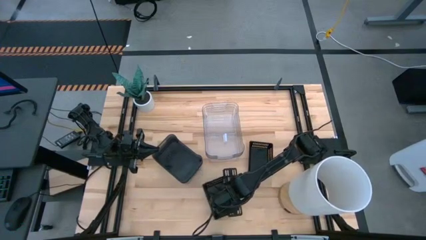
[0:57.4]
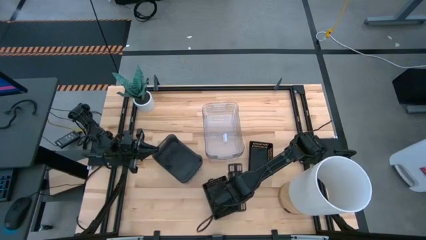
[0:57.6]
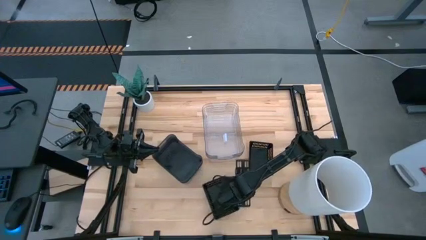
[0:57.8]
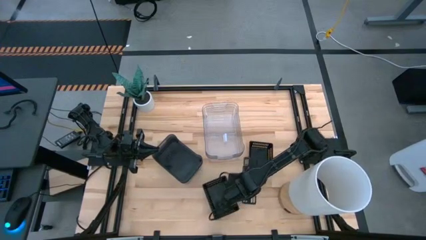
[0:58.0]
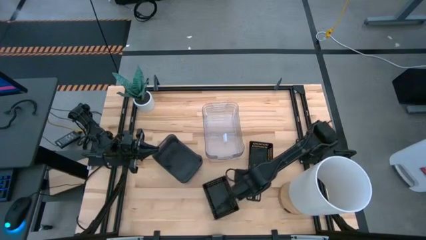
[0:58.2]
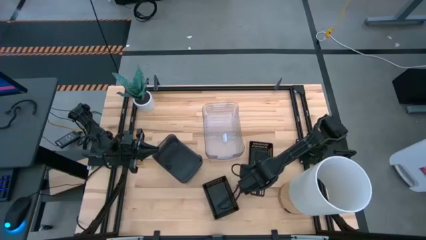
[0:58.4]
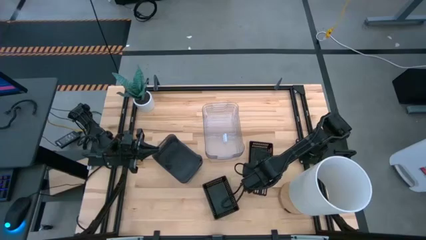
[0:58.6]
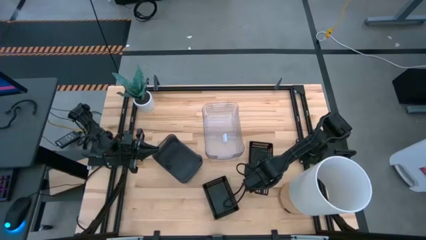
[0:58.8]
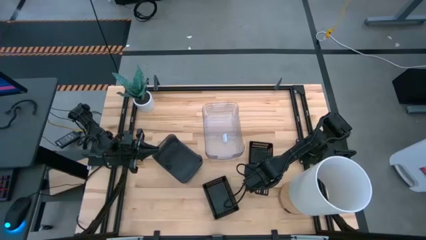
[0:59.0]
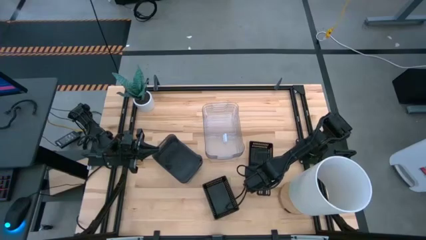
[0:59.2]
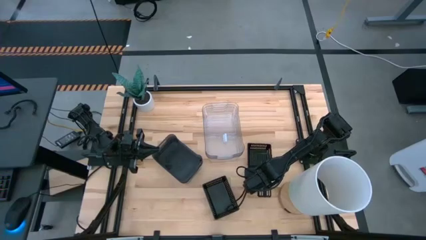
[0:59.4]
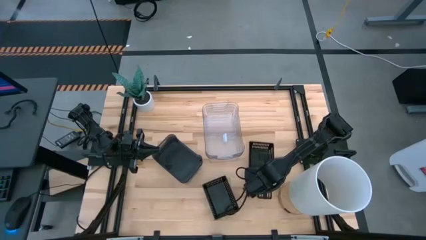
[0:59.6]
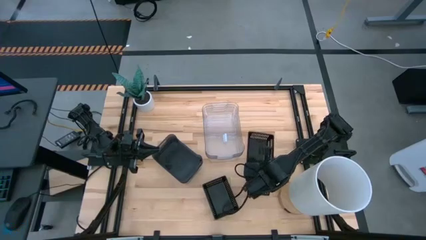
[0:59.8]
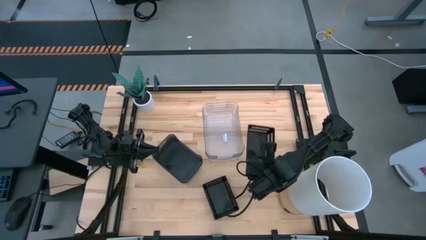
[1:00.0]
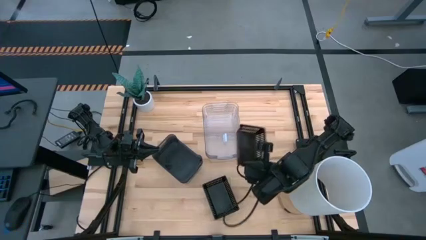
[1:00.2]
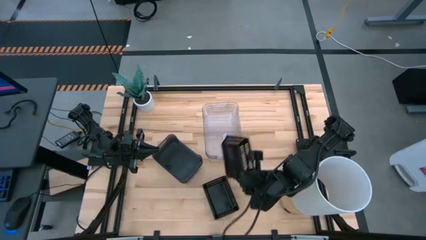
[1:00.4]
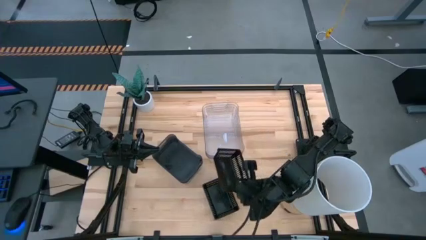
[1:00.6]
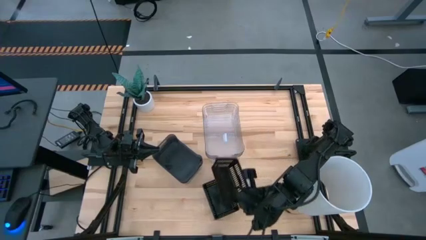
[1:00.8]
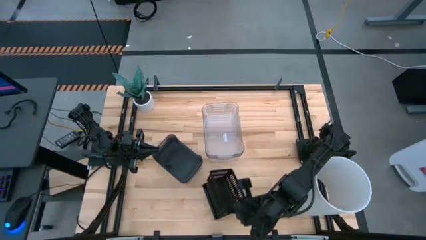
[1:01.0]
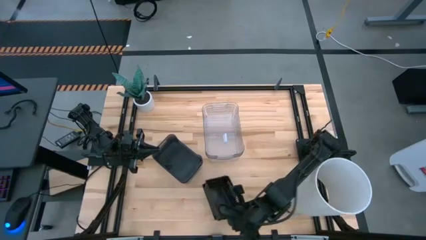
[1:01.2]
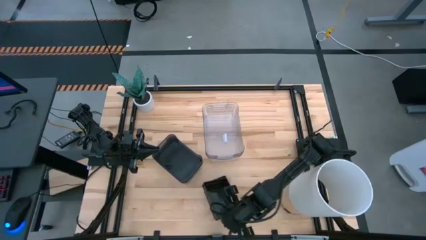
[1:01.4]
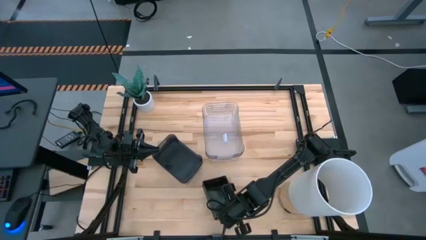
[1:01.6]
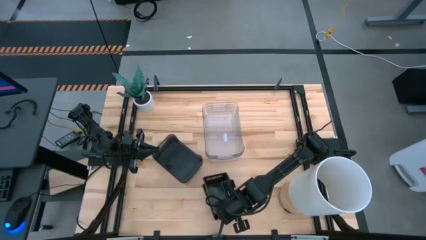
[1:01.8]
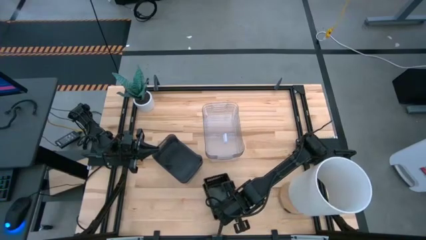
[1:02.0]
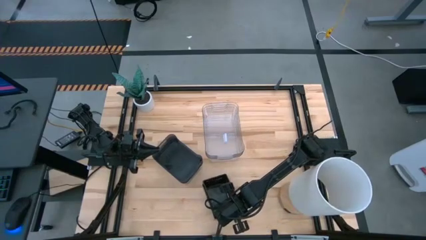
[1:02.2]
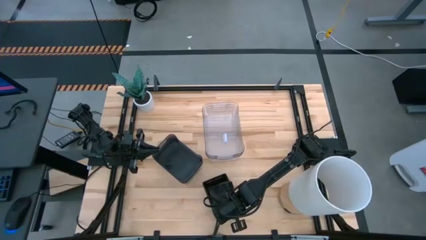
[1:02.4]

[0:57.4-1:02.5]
Stack the black bin on the left black bins

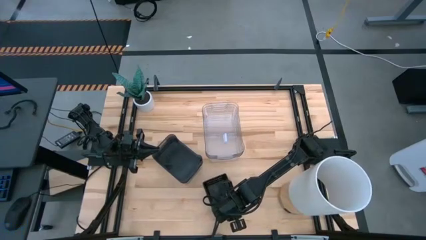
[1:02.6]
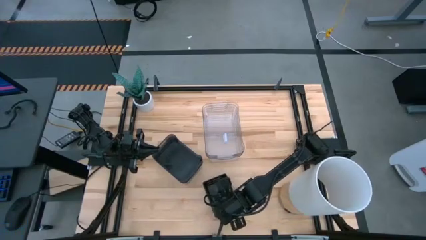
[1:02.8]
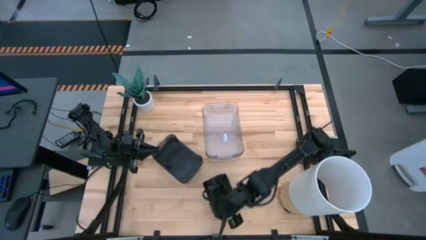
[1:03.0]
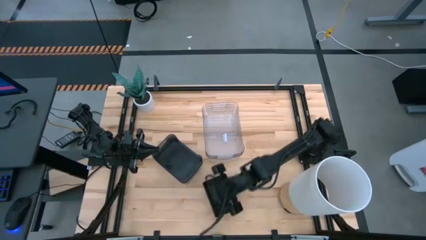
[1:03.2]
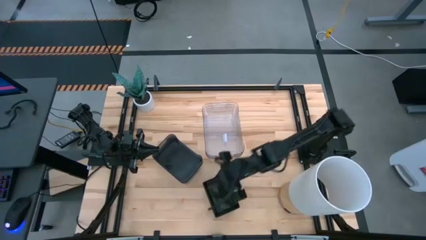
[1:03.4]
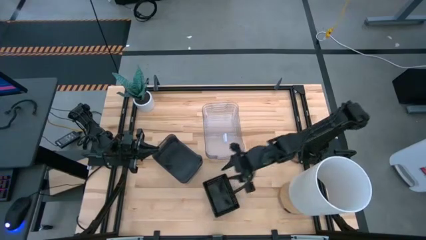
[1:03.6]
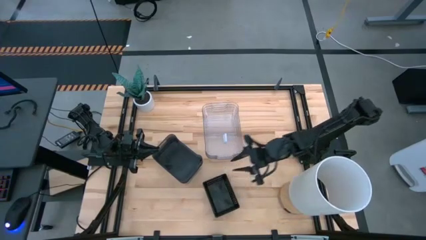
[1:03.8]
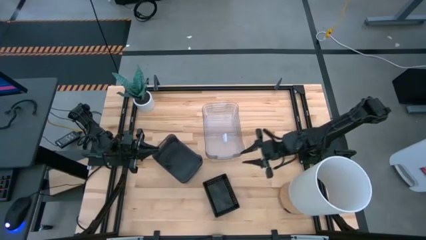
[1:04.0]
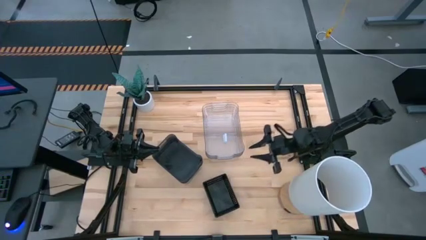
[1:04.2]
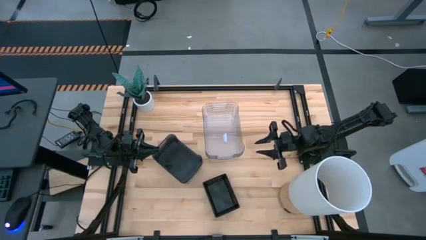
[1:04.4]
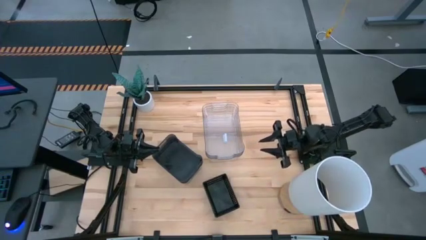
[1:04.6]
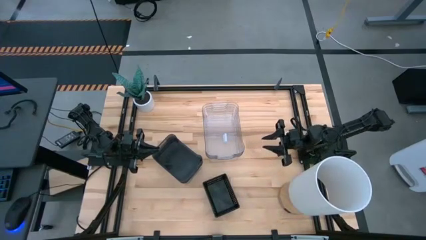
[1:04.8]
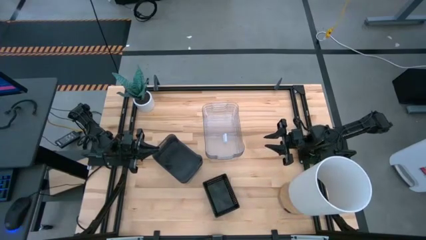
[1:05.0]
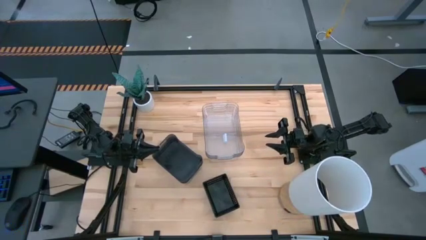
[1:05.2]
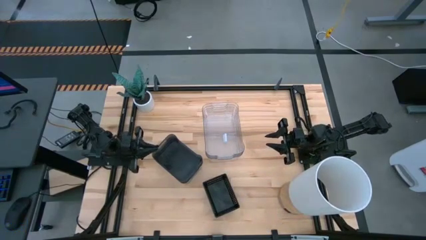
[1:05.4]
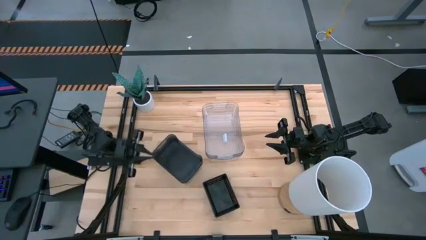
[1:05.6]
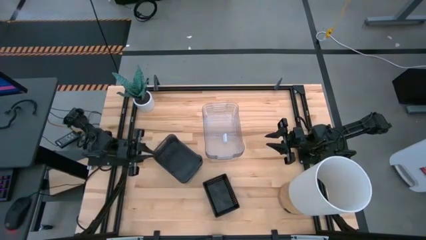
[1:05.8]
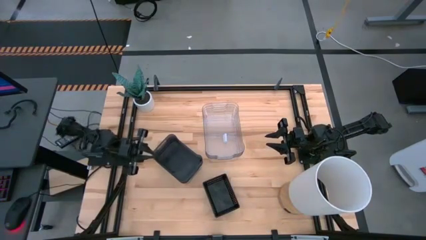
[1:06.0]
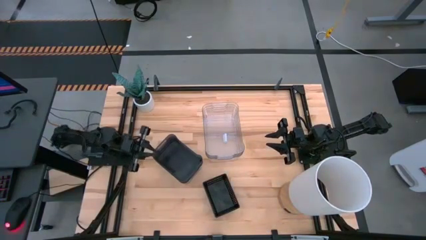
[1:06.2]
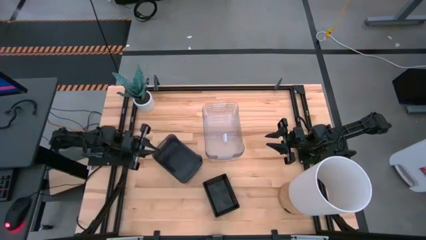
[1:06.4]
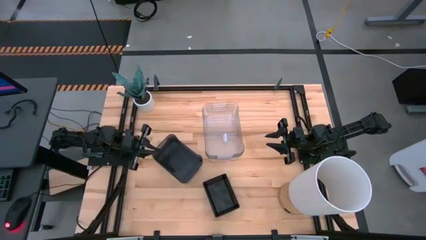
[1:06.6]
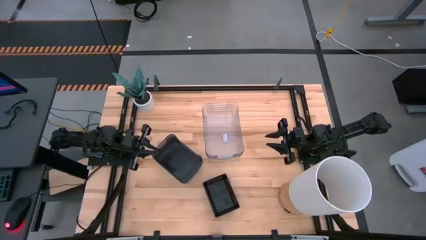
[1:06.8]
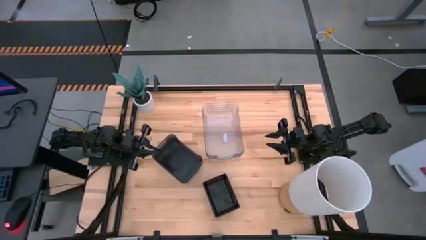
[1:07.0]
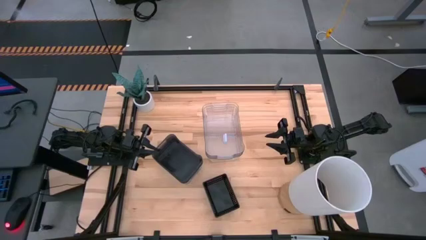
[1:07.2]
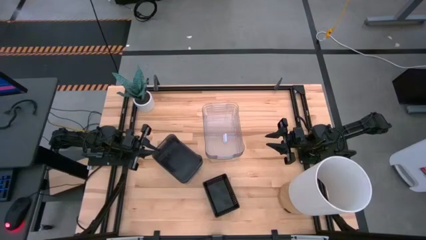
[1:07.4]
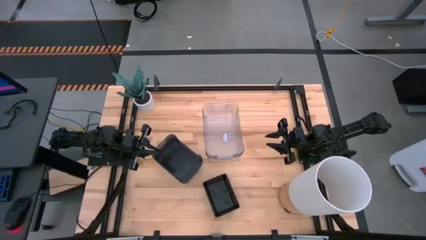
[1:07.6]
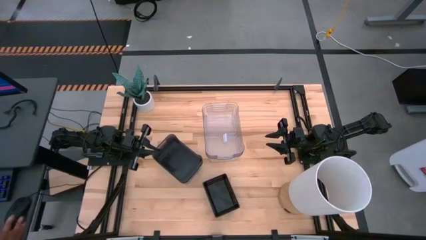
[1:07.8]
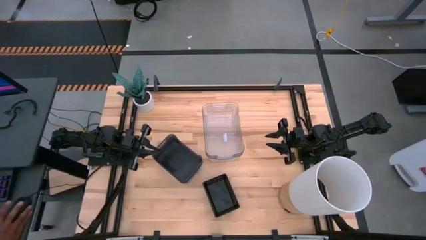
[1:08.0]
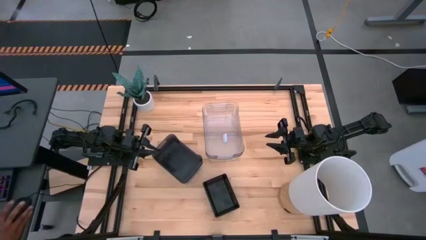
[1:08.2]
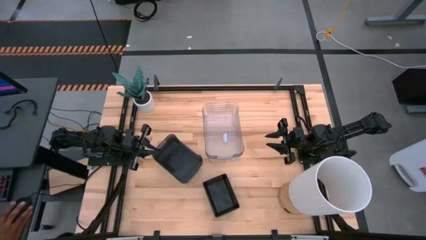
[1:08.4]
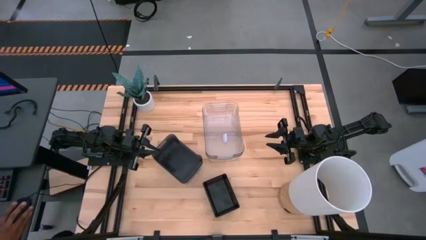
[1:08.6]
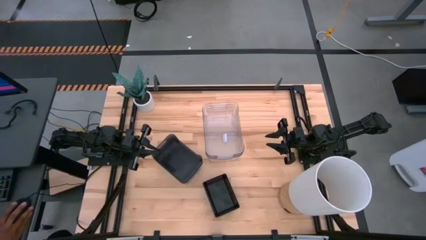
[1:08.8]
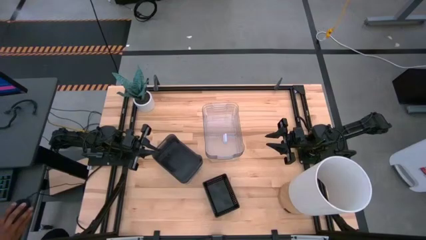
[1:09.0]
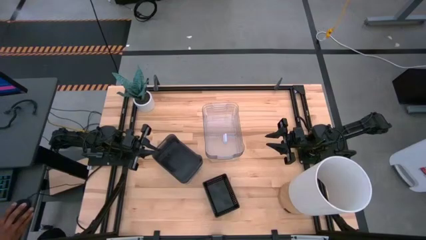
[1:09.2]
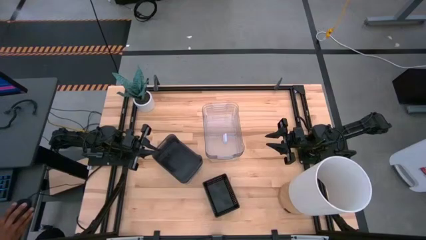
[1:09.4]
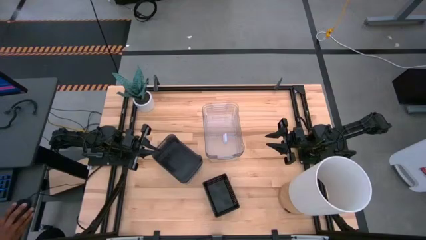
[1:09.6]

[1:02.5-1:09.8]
Return to Home Position

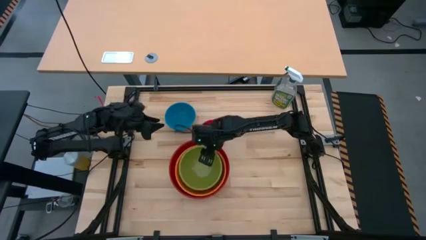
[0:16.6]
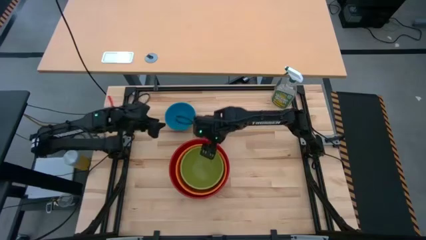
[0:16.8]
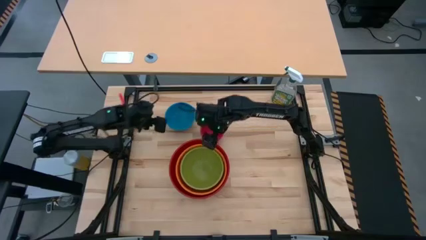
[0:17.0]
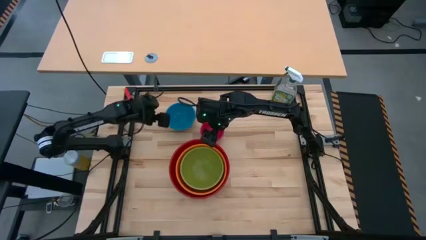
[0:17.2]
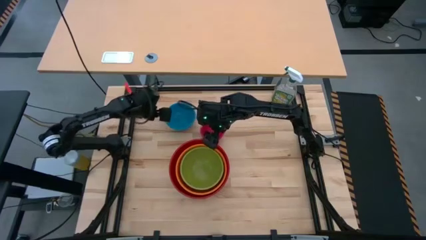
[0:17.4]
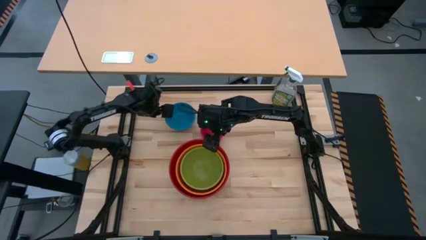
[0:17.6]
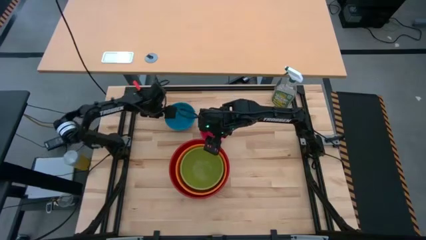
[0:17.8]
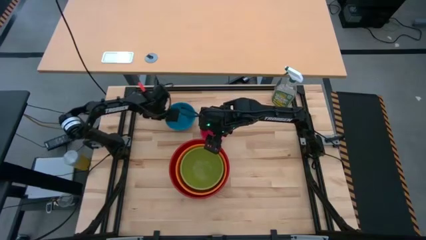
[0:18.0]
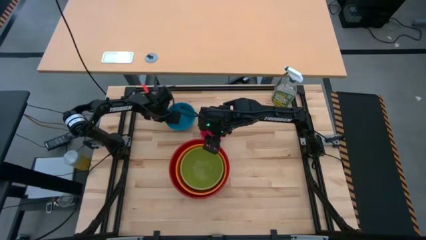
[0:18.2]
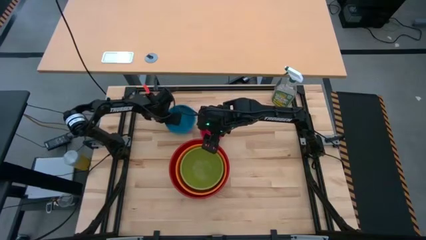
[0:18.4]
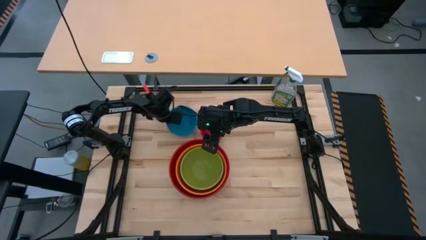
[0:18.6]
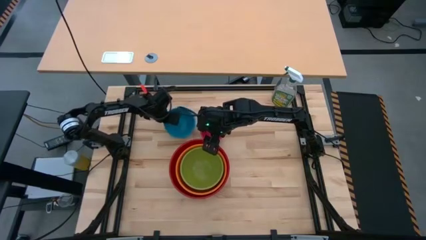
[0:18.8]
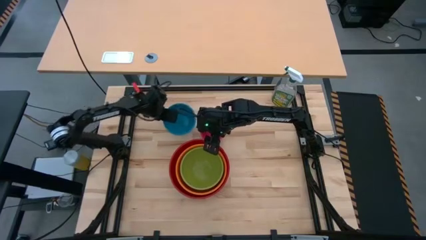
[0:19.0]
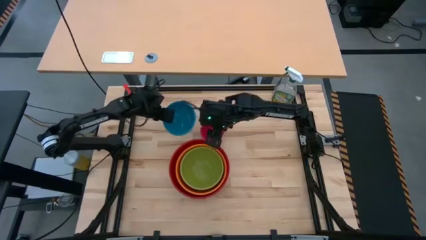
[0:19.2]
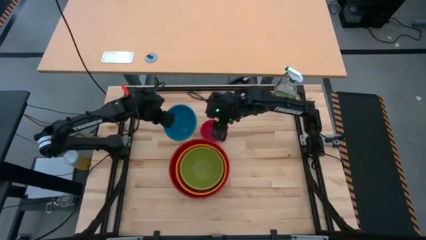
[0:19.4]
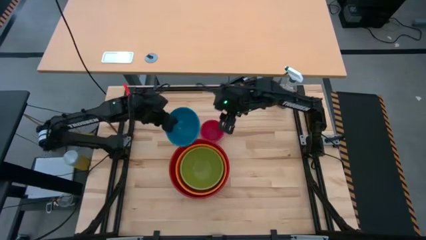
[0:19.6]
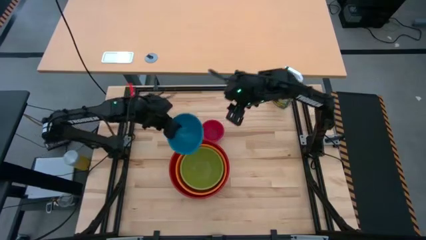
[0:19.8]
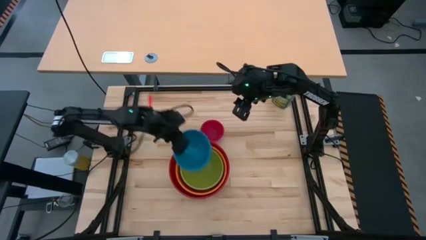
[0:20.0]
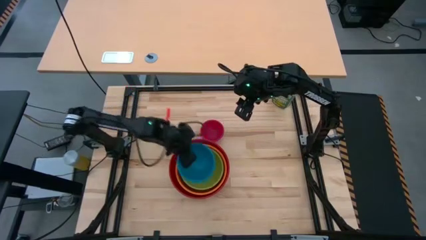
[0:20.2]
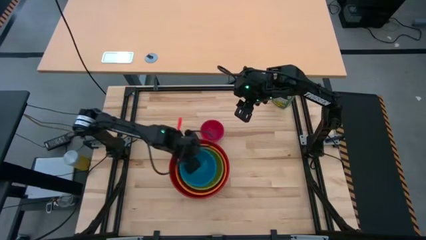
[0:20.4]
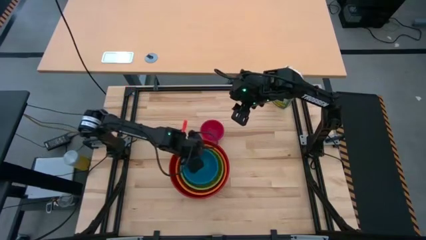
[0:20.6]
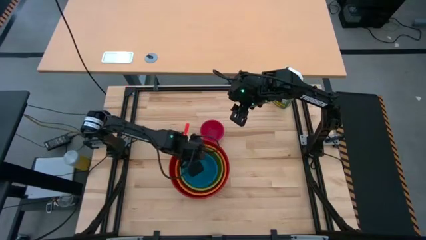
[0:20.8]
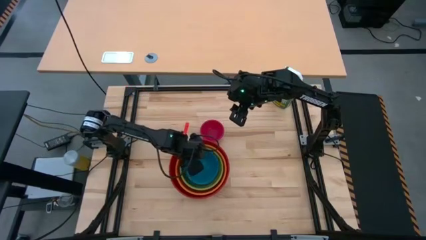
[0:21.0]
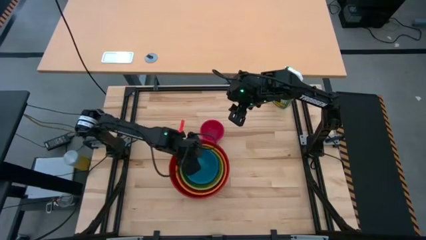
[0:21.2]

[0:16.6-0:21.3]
Stack the blue bowl on top of the green bowl
